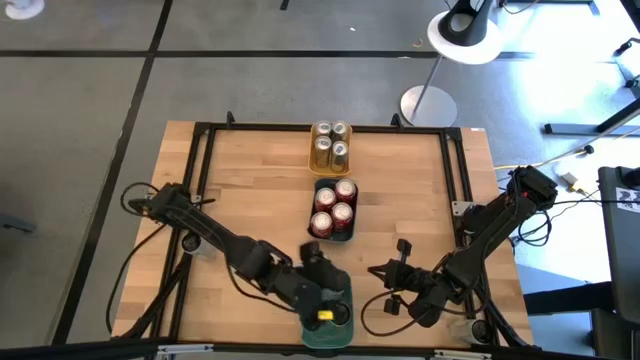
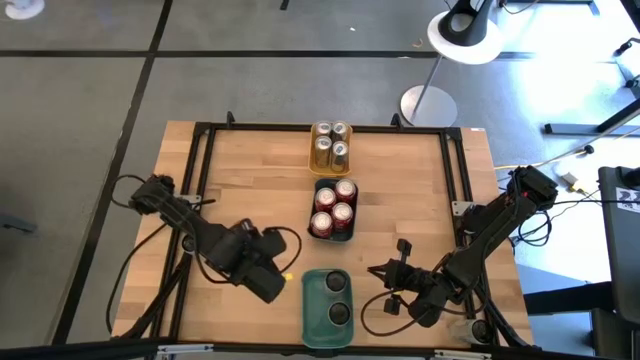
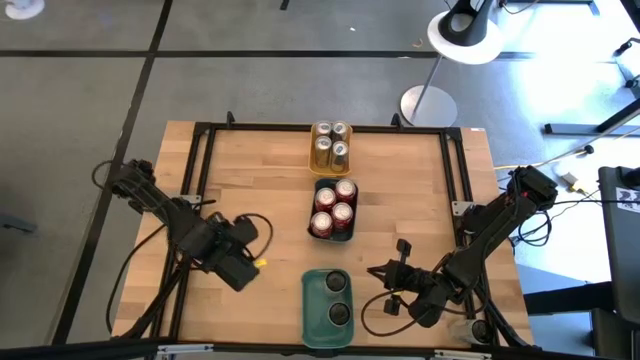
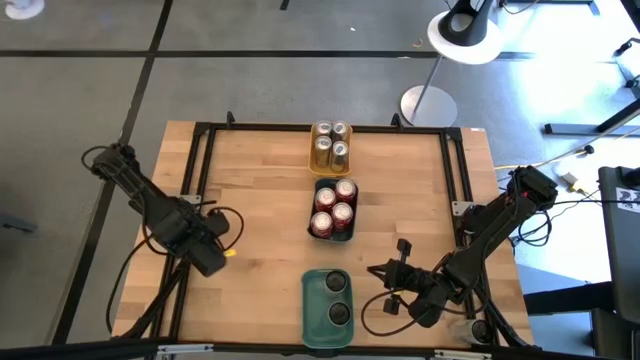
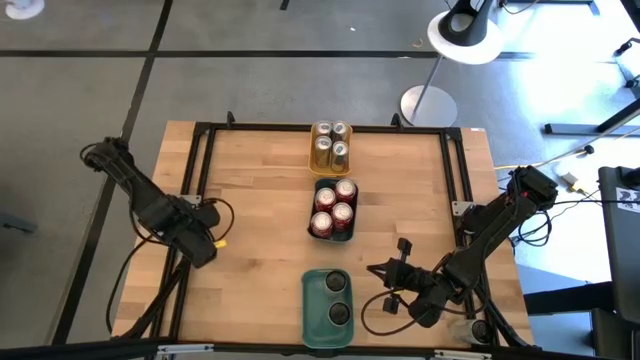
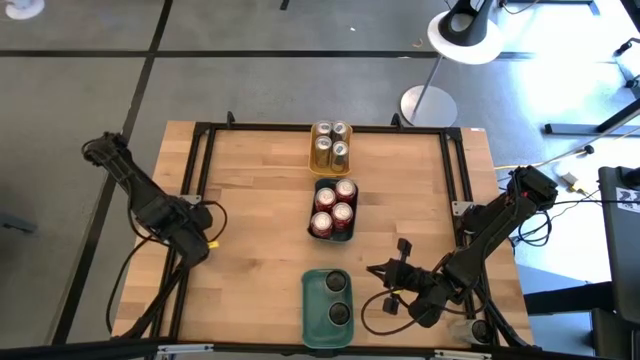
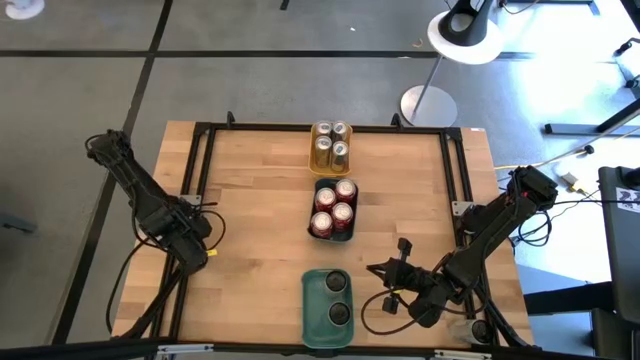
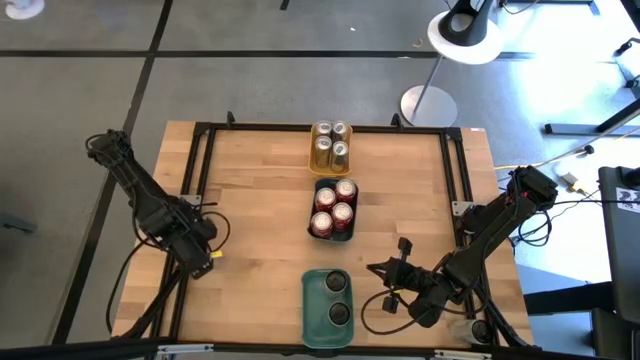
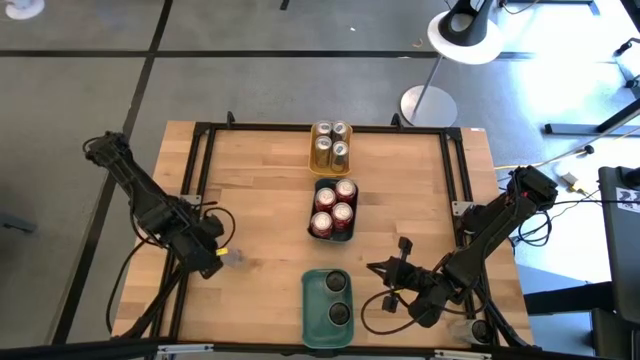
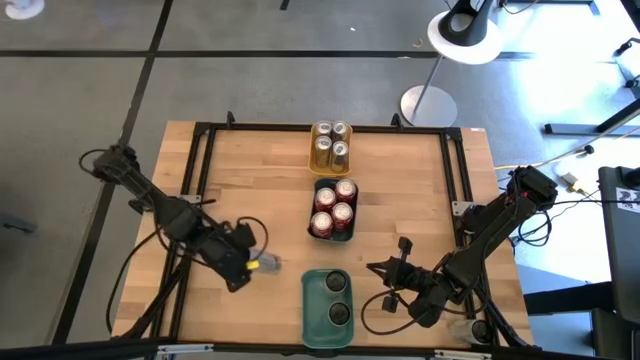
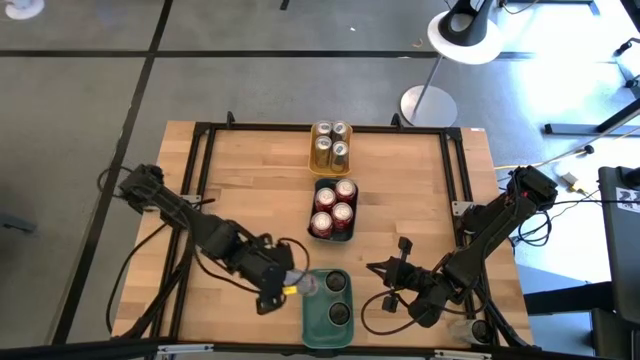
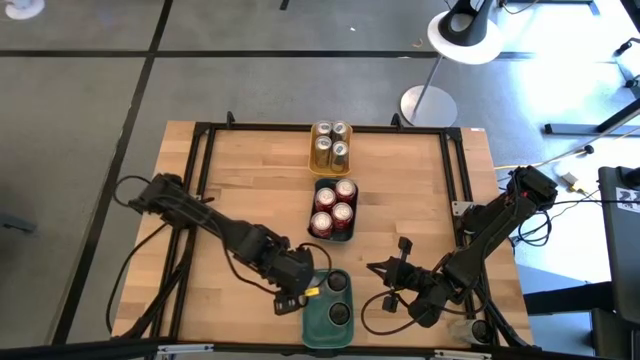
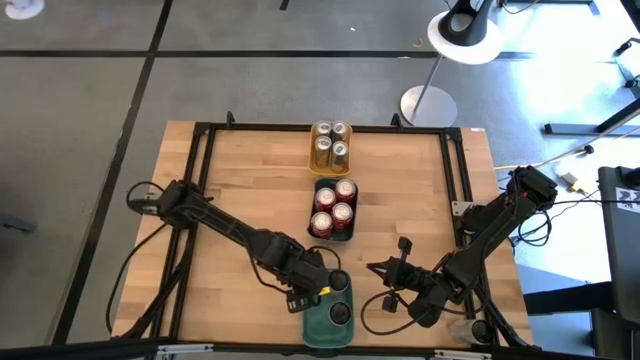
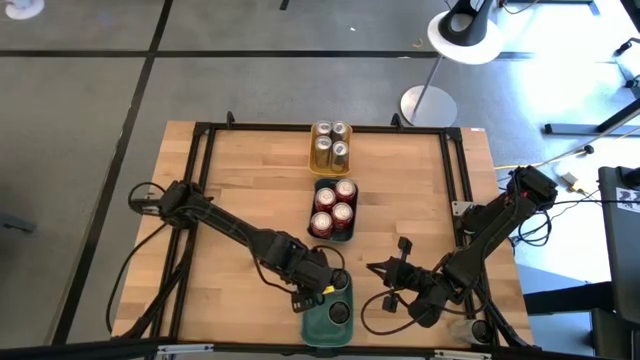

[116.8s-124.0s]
Task: Sort soda cans
Put the left white, pink soda can into the green bin

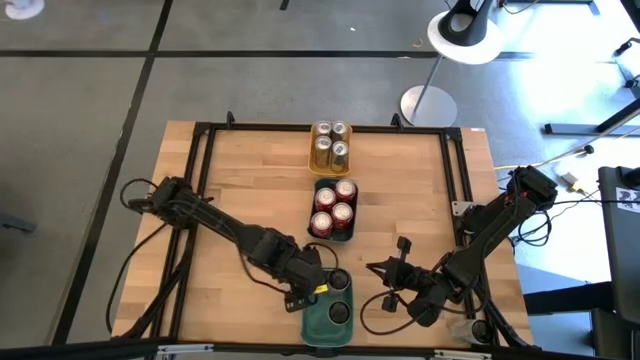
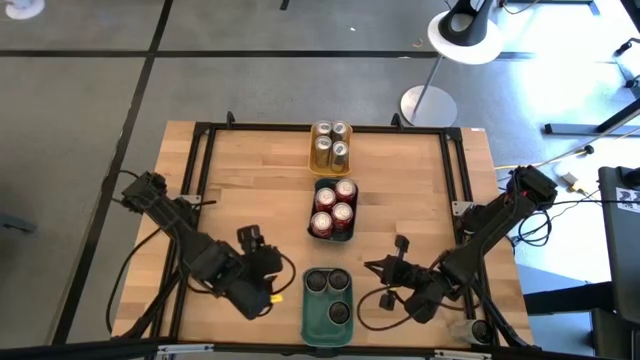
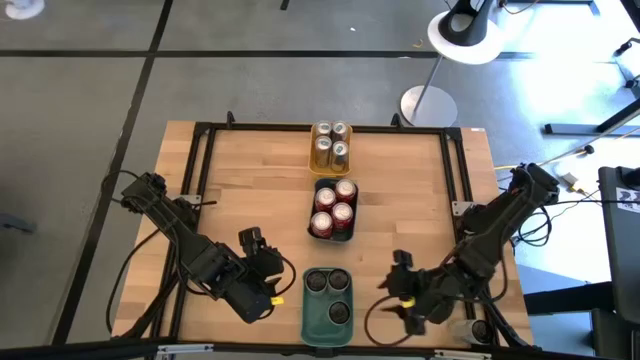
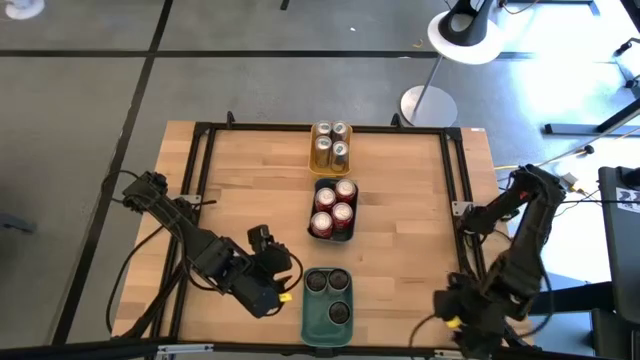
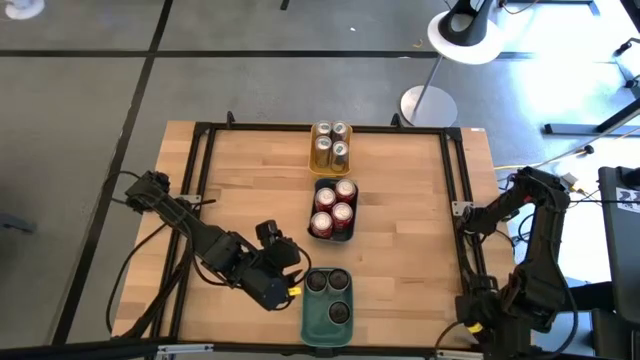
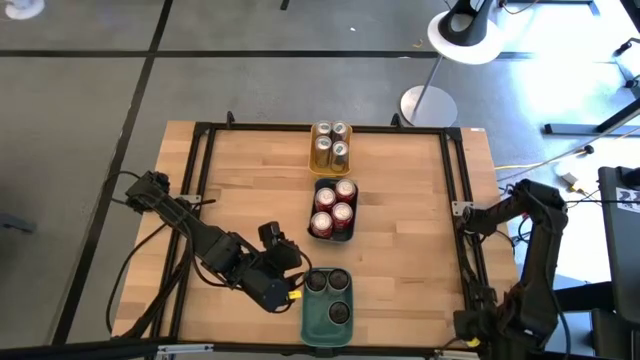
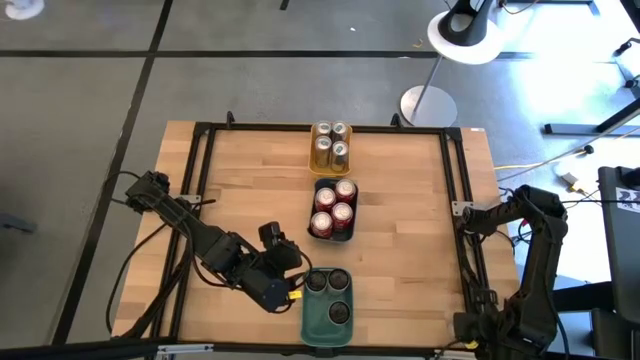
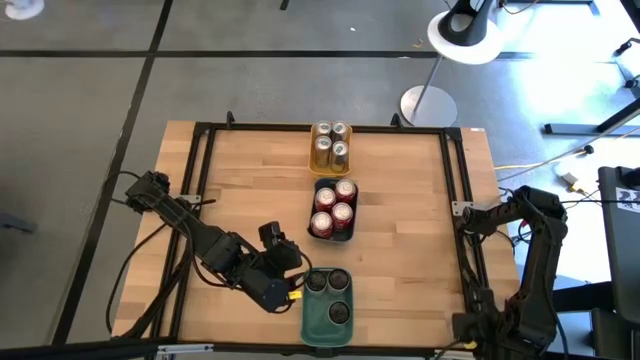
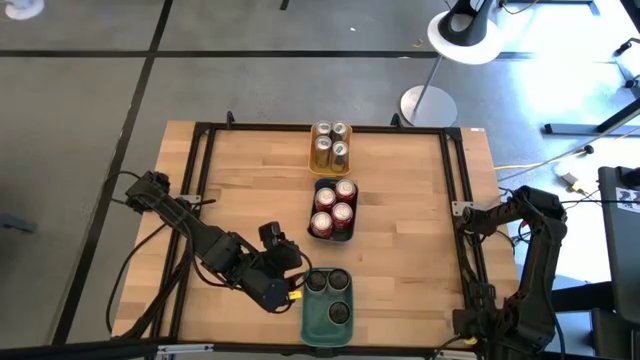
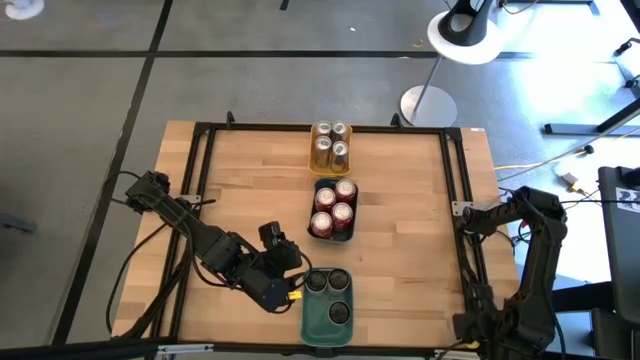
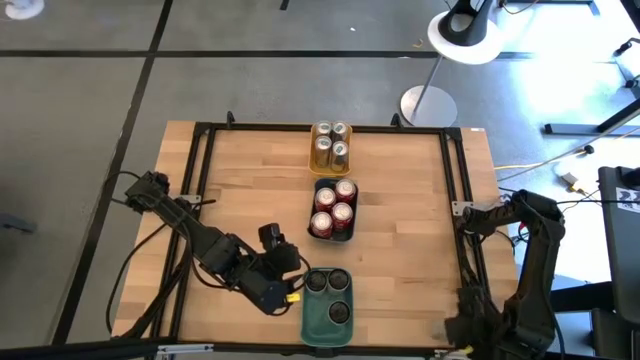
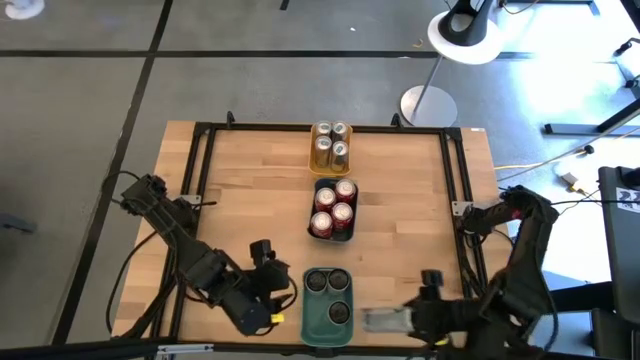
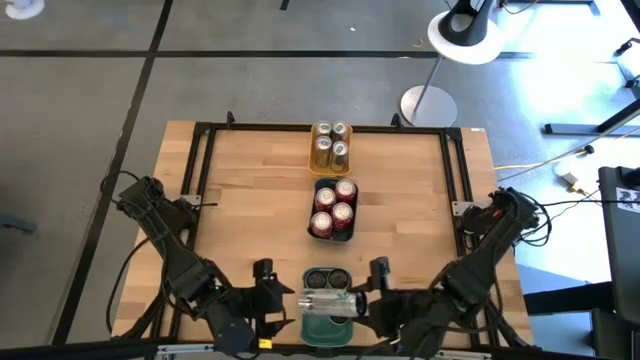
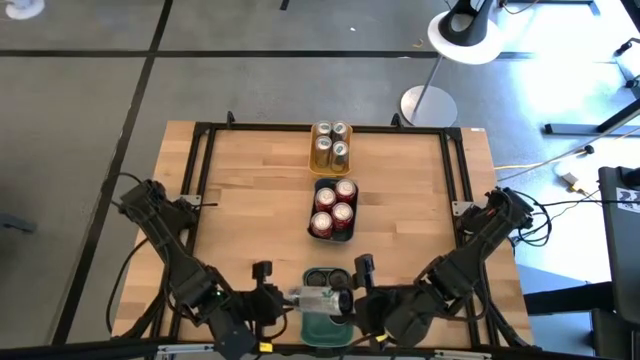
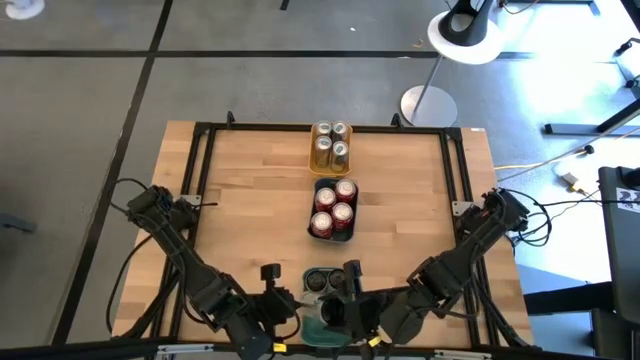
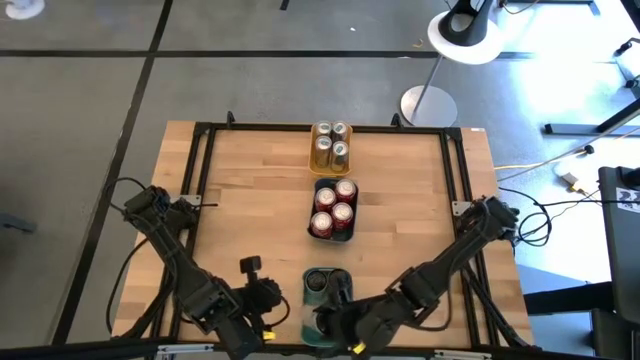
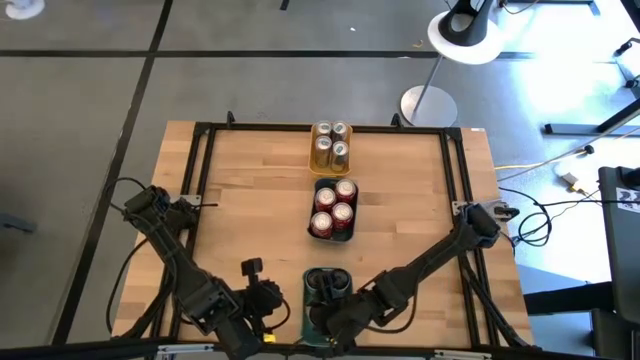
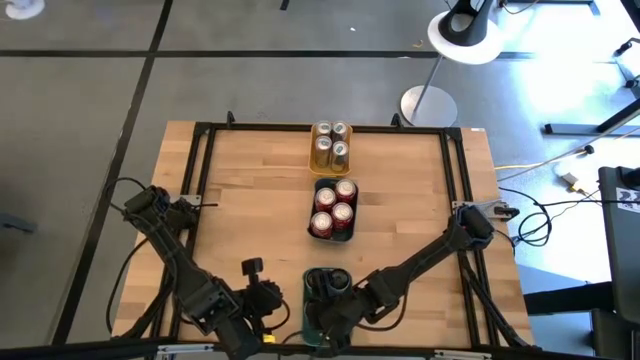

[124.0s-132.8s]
Put the white, pink soda can into the green bin

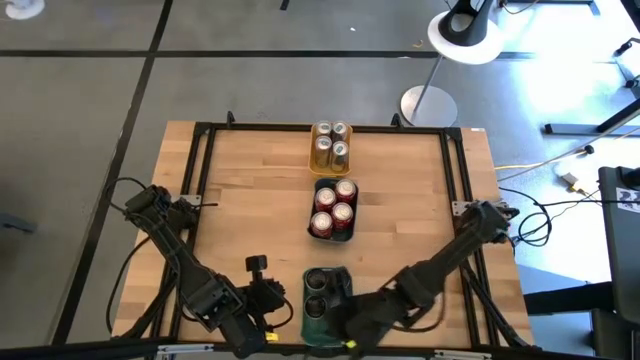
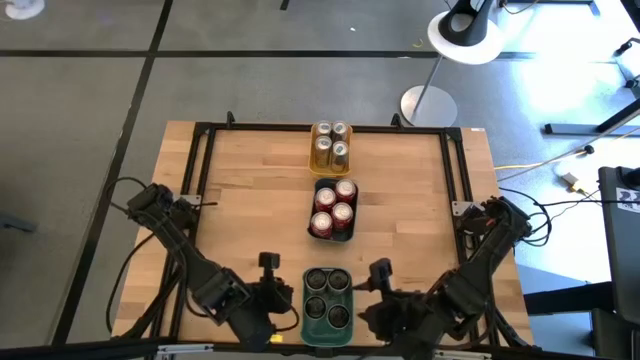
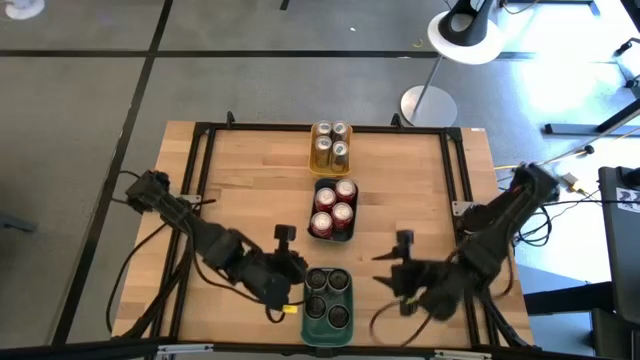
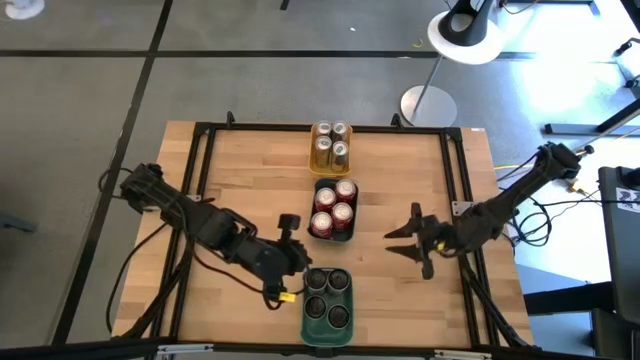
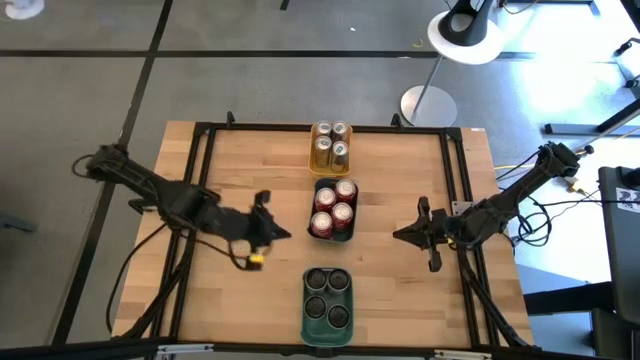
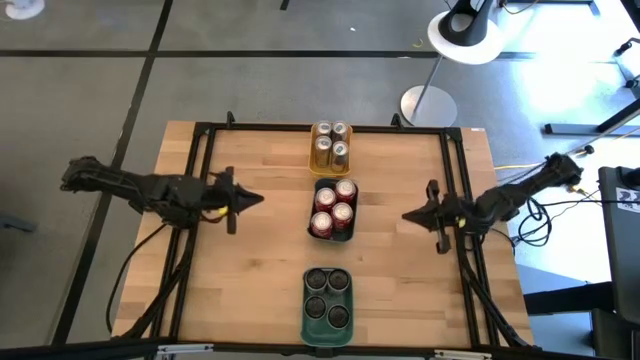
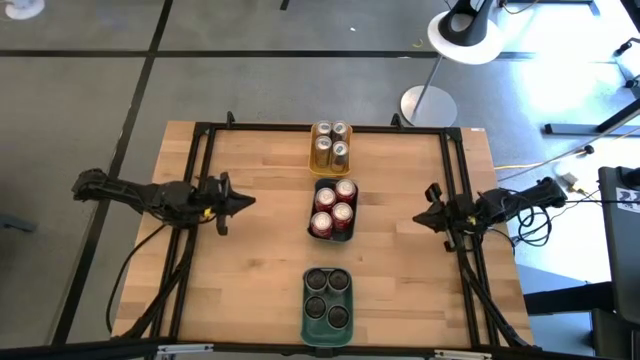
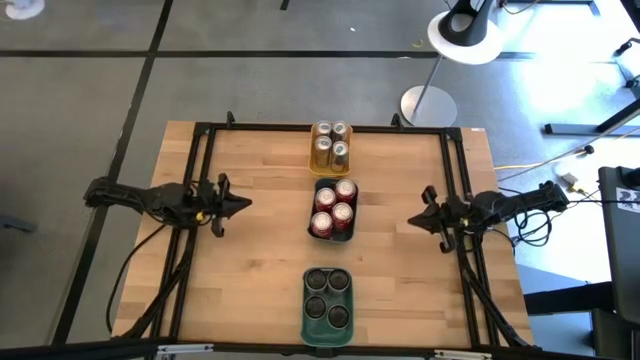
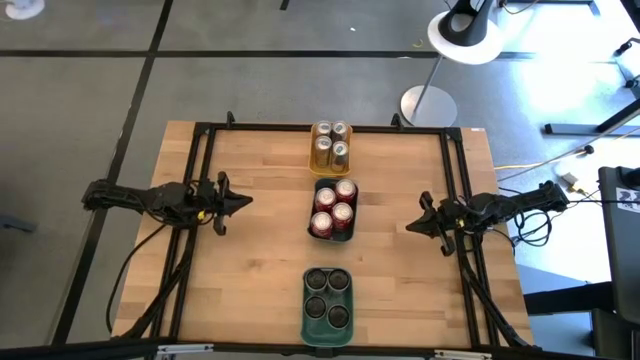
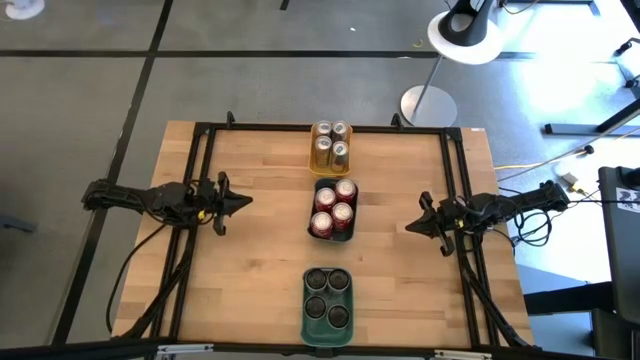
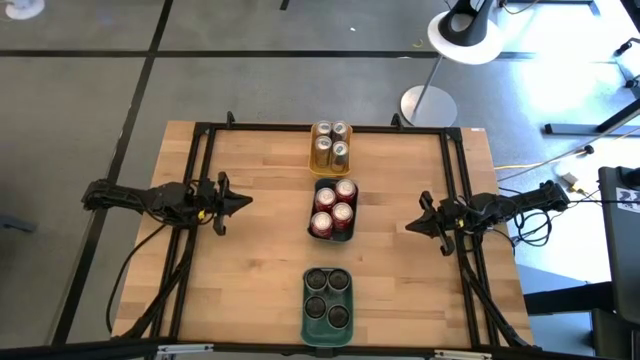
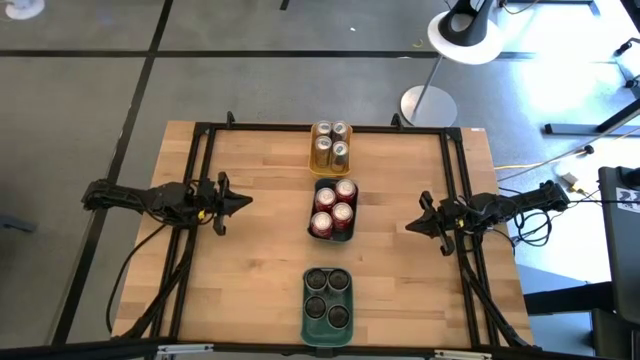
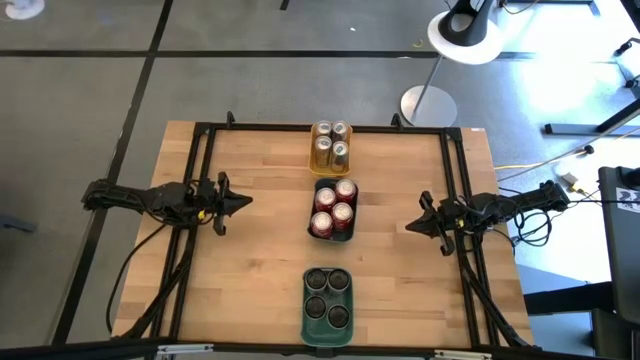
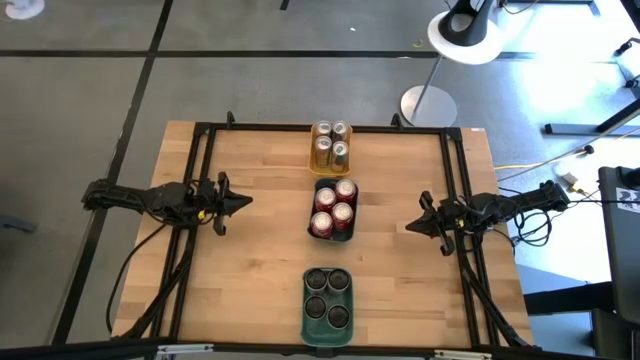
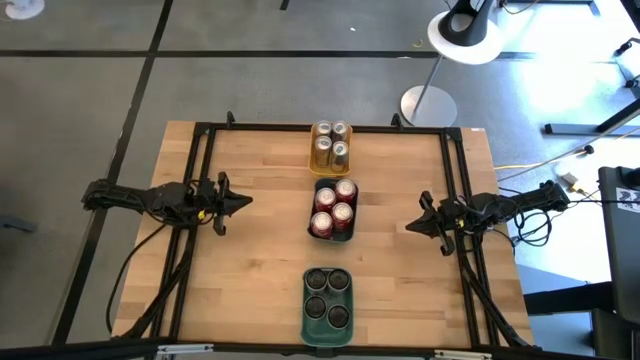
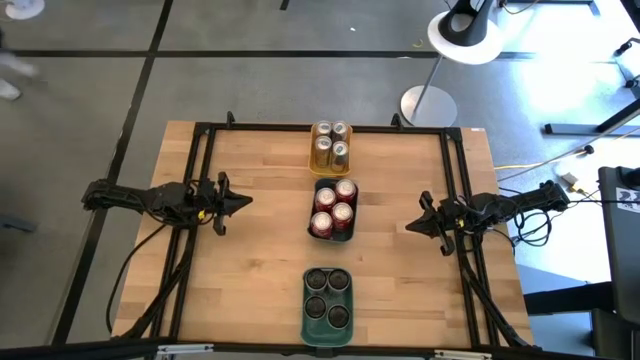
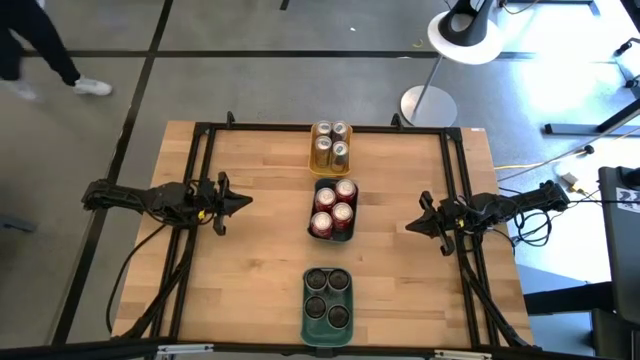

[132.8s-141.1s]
Return to Home Position
